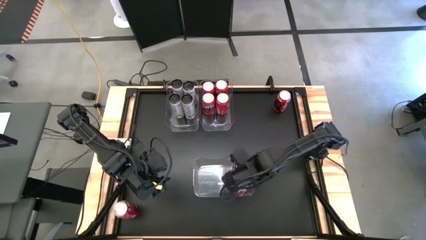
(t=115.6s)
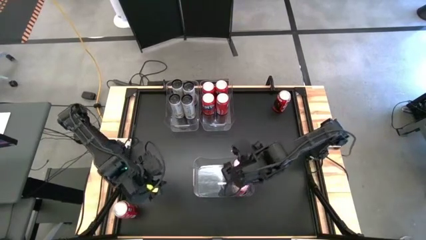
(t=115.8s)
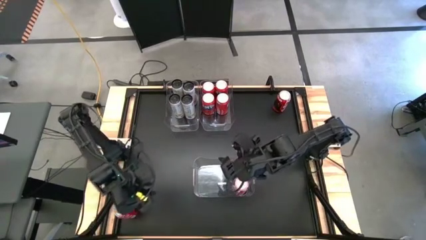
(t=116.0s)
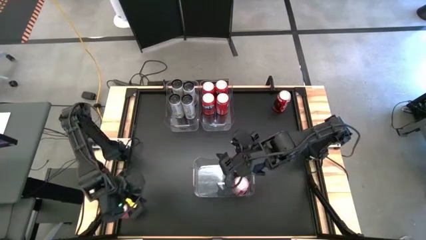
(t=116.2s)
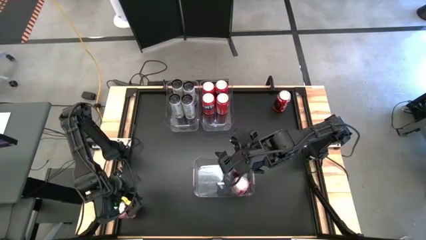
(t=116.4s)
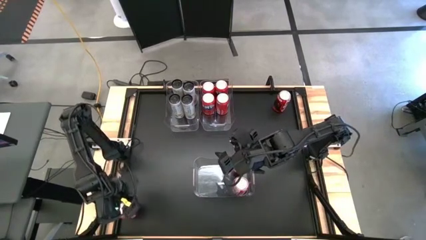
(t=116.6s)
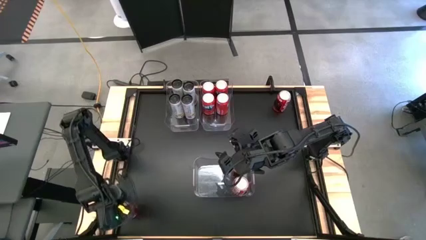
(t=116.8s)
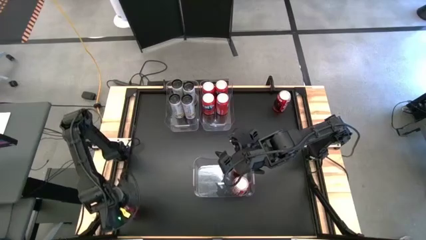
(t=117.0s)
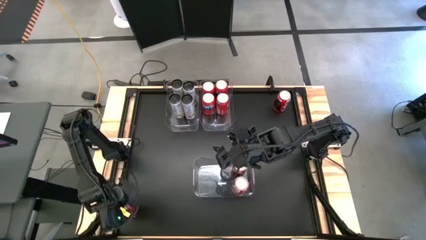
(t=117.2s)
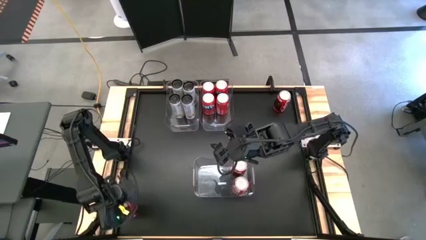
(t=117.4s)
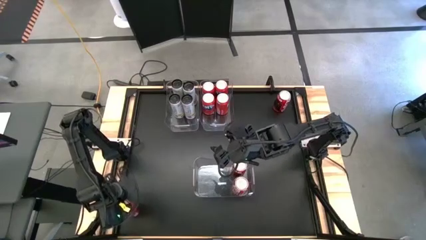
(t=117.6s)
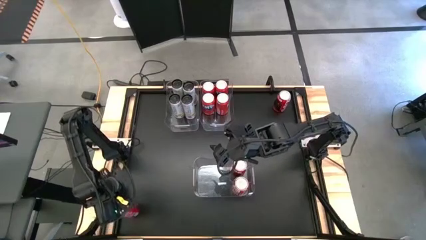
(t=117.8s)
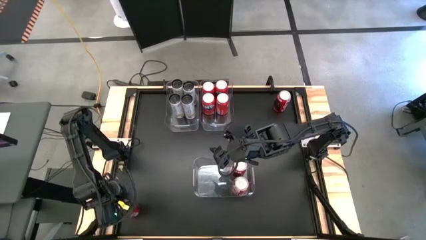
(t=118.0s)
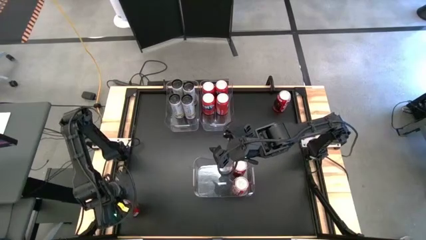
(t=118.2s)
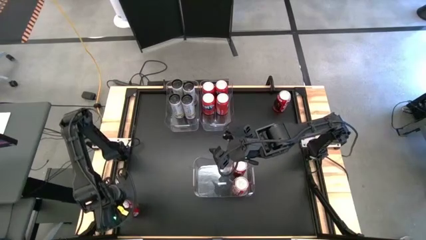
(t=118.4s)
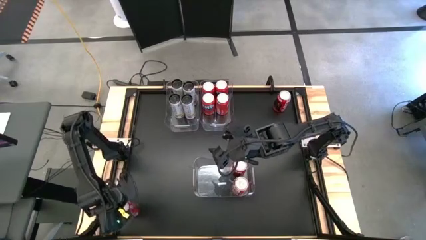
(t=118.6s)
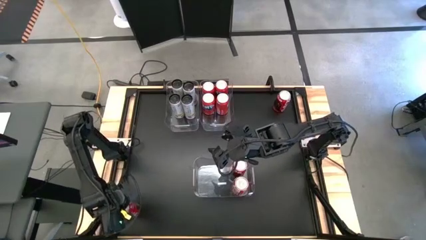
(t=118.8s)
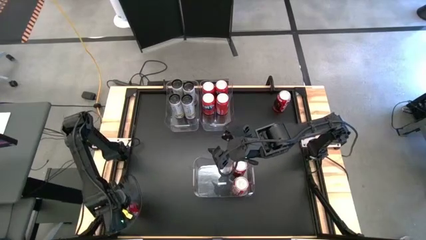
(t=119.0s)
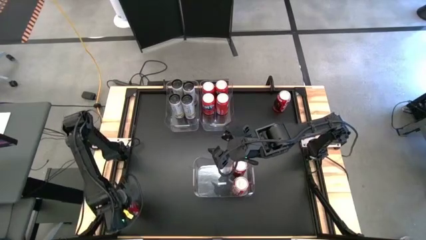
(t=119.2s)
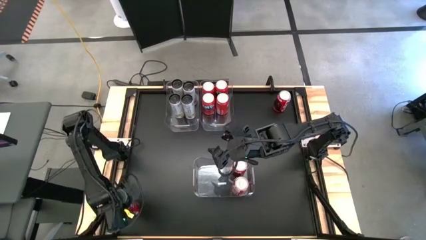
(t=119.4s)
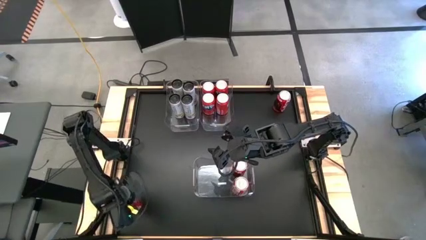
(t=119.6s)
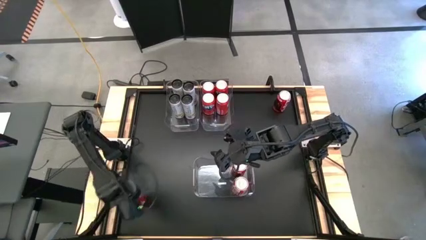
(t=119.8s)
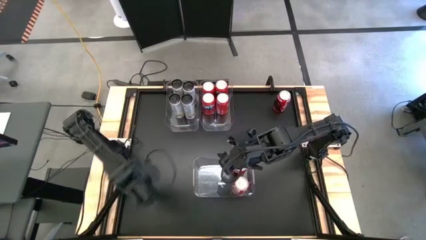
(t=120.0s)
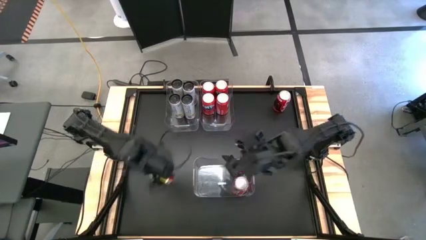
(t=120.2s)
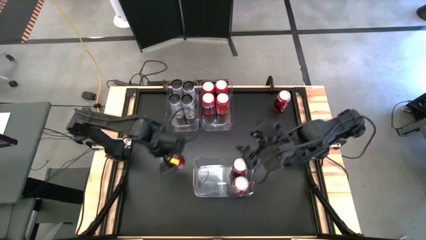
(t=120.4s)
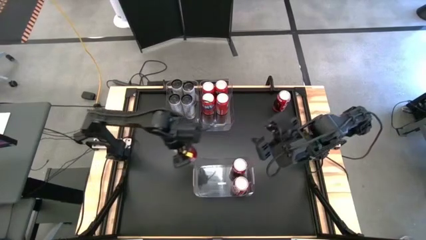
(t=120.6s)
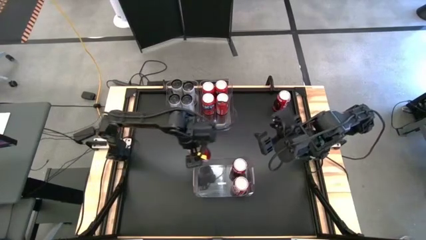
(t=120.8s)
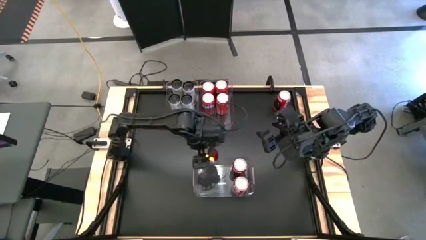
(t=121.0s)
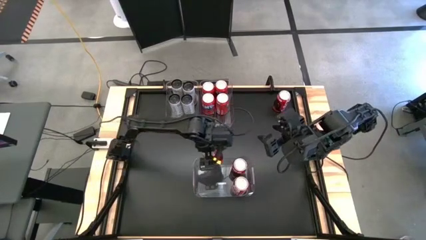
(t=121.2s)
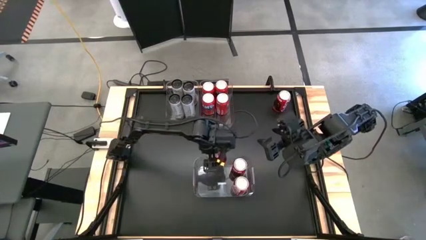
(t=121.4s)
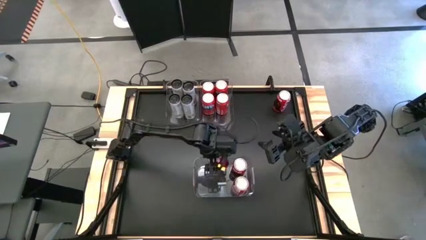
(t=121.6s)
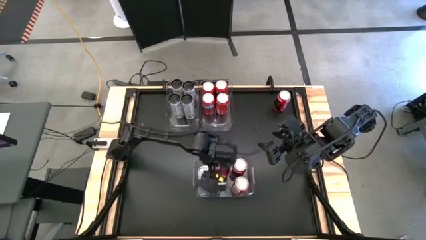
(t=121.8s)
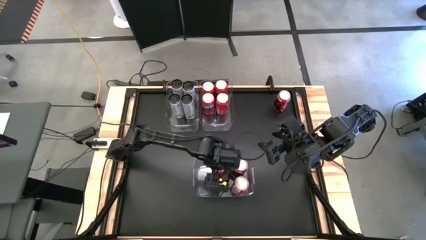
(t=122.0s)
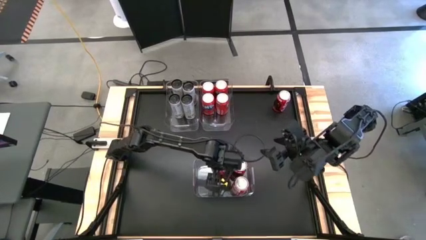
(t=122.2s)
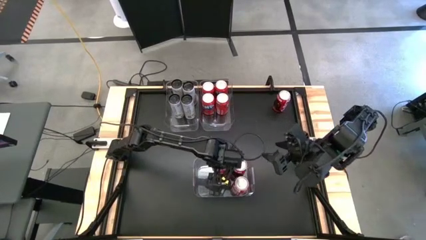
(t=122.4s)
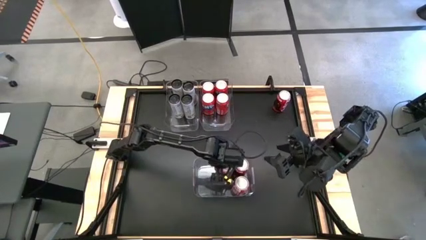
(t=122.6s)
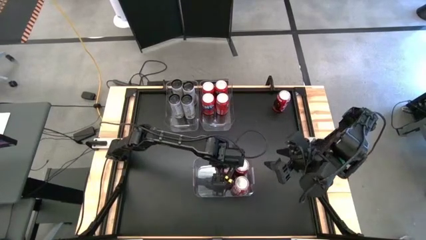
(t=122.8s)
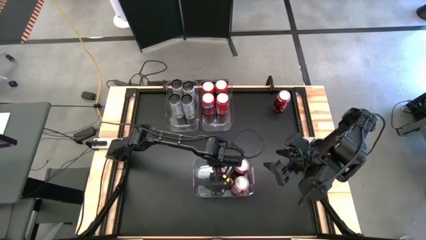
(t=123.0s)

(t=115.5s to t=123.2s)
Task: Sort soda cans
Put the bottom red soda can into the bottom transparent bin

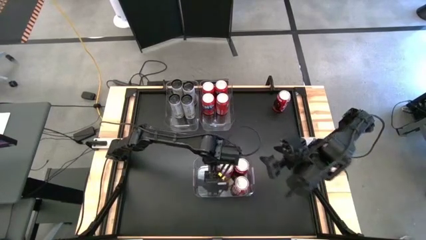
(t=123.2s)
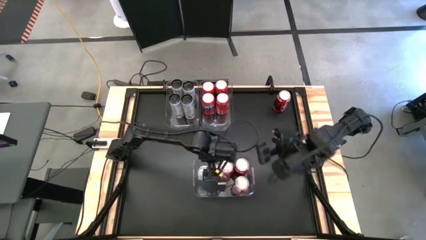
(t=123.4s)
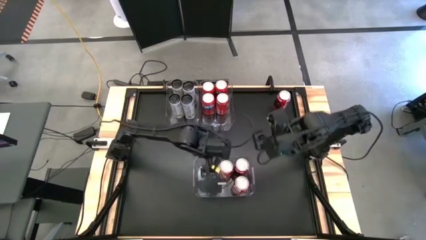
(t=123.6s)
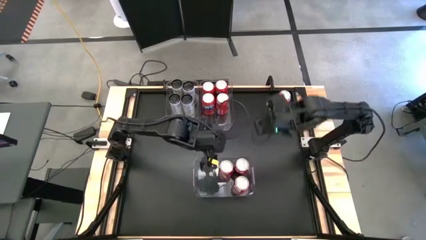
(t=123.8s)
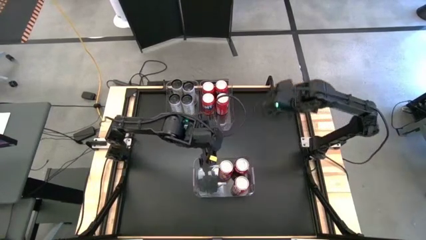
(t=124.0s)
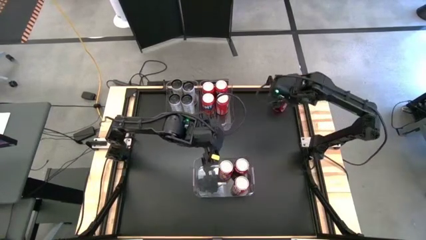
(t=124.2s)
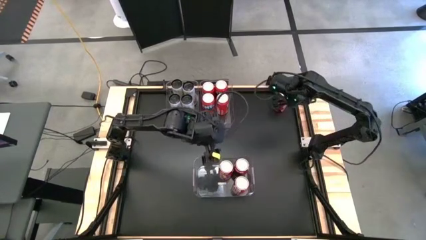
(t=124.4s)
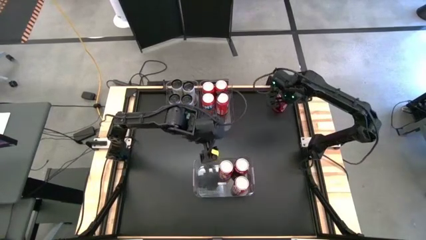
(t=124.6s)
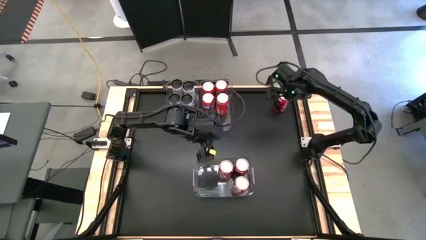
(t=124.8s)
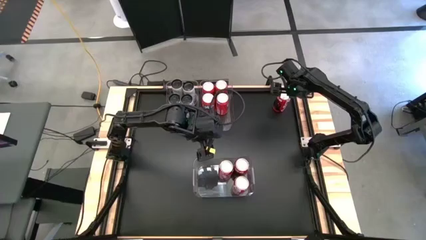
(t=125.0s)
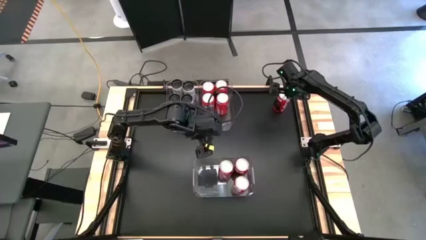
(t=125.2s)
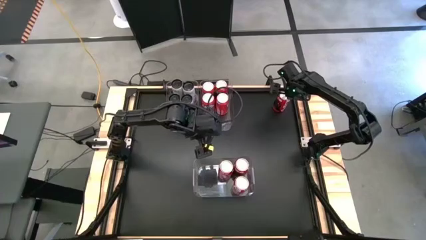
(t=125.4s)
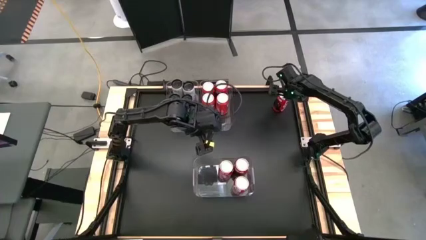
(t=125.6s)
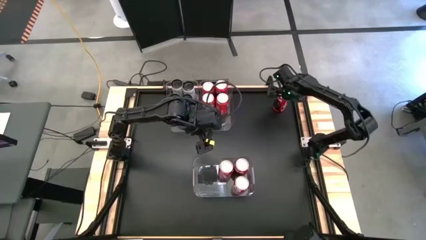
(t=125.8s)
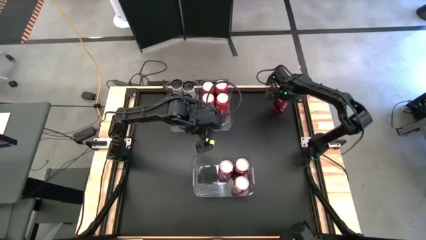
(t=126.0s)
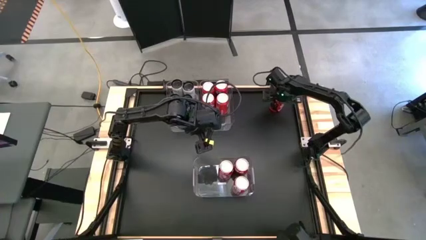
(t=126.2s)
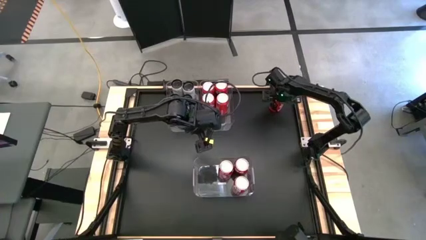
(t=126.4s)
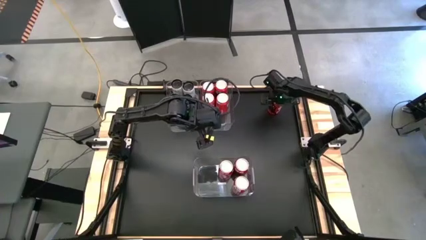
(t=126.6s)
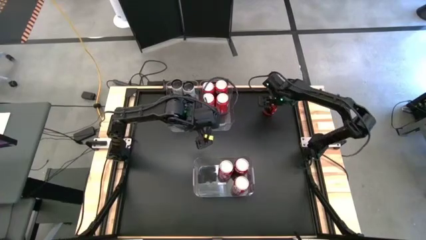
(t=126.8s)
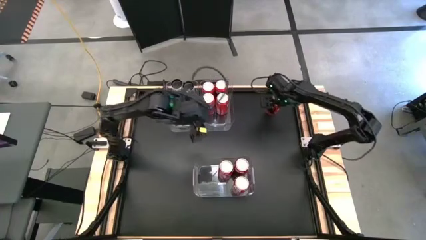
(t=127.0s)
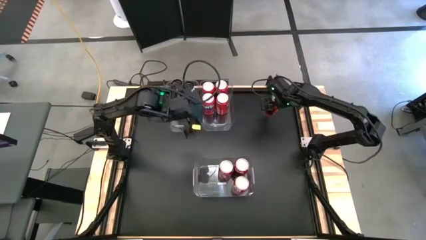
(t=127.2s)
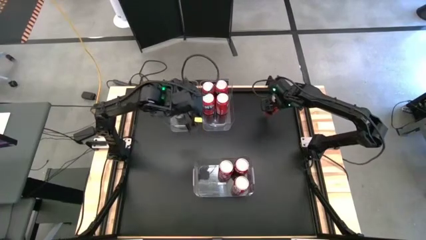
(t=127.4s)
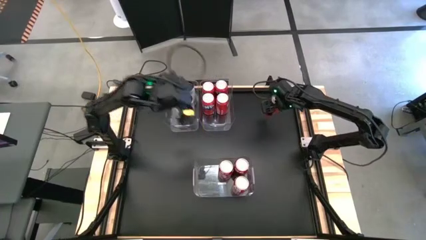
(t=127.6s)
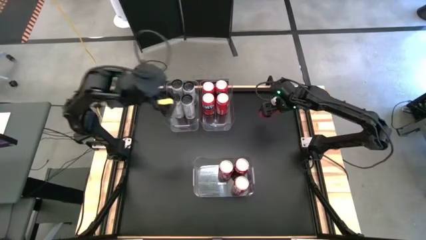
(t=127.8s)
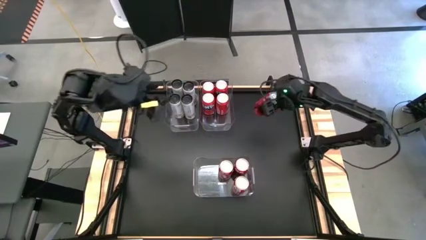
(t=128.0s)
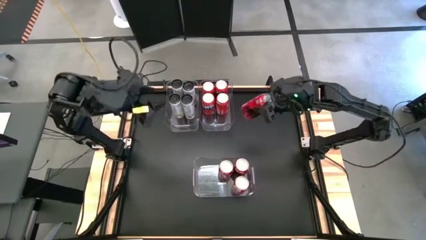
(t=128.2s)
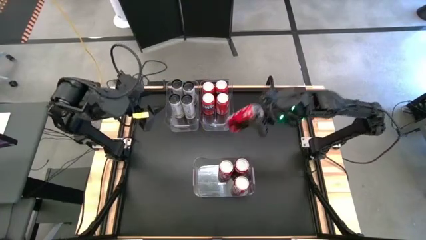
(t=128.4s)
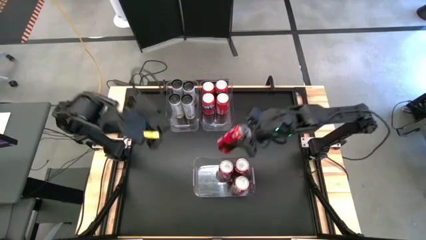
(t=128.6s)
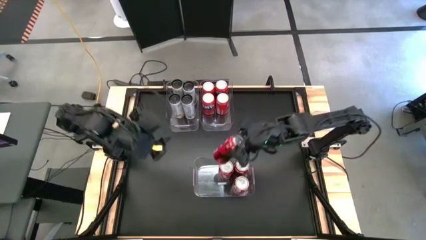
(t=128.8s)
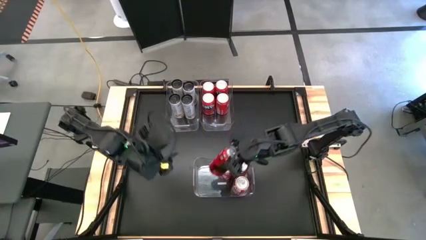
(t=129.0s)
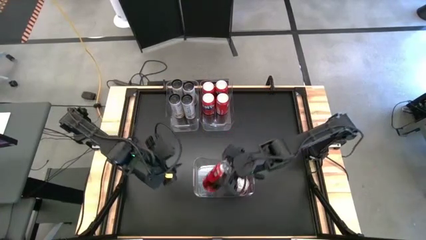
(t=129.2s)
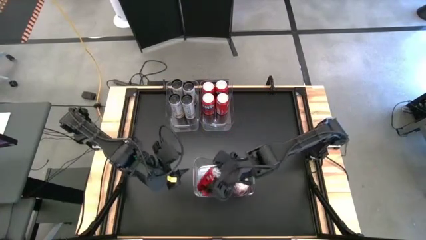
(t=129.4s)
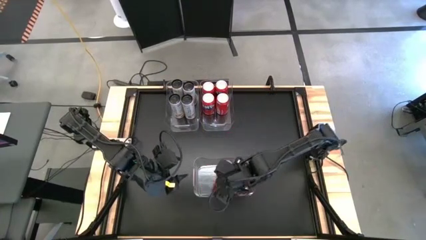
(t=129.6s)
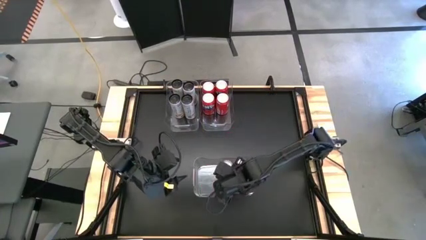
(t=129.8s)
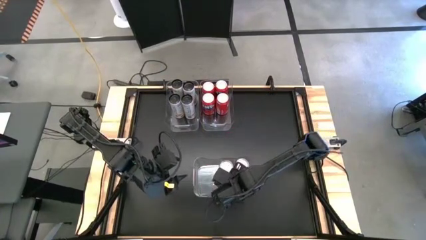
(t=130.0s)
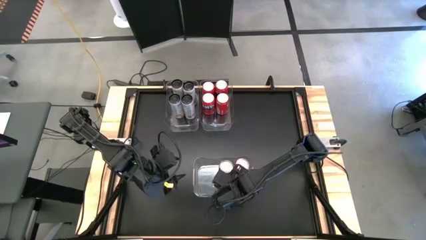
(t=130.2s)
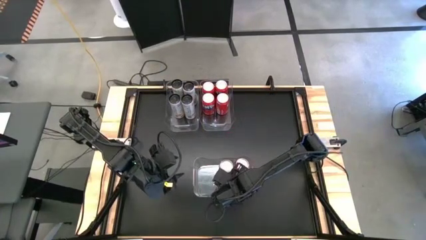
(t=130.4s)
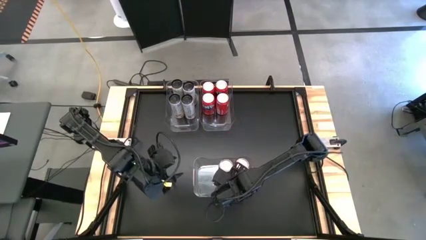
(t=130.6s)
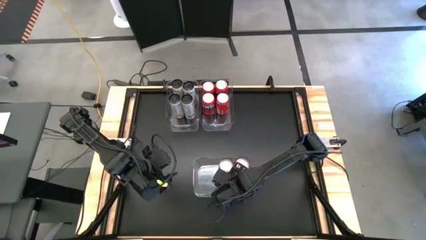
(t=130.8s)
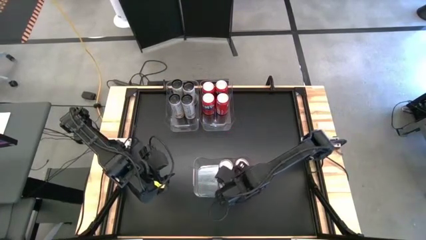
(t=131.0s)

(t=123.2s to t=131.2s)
Put the red soda can into the bottom transparent bin
